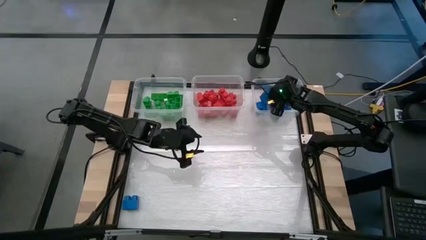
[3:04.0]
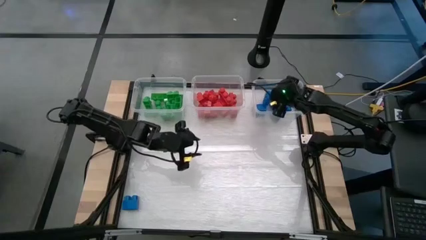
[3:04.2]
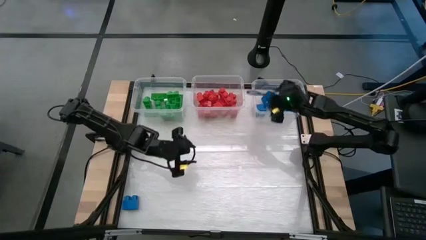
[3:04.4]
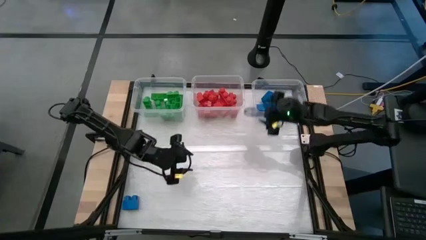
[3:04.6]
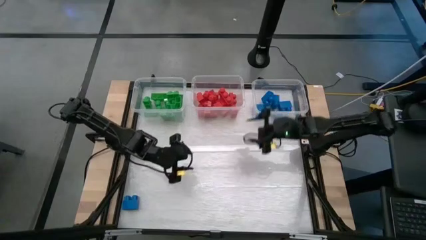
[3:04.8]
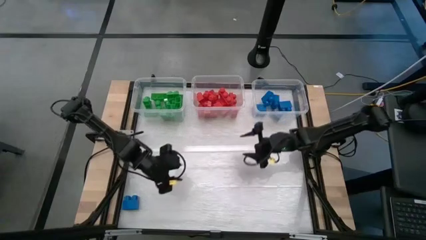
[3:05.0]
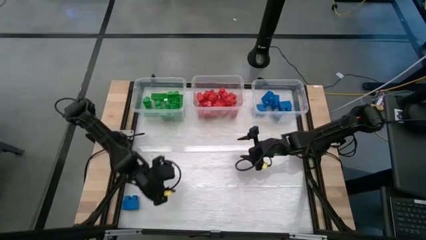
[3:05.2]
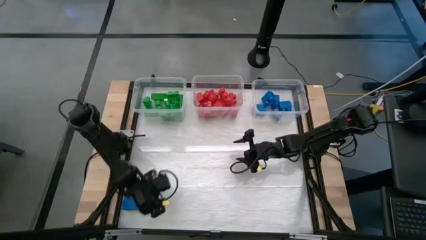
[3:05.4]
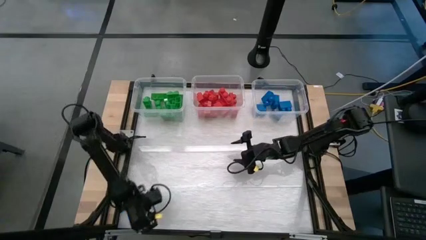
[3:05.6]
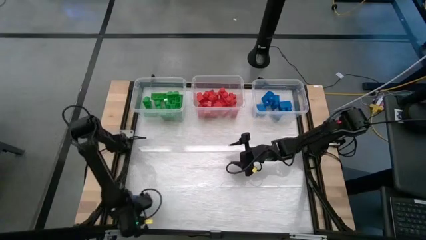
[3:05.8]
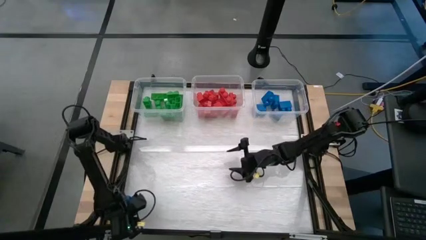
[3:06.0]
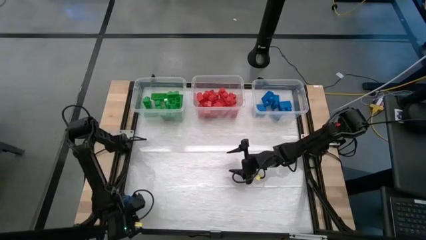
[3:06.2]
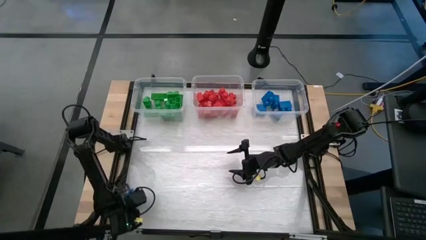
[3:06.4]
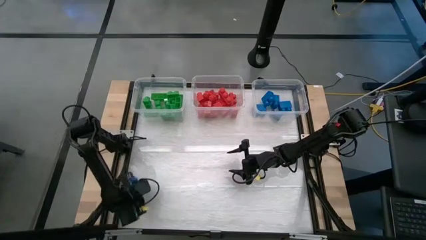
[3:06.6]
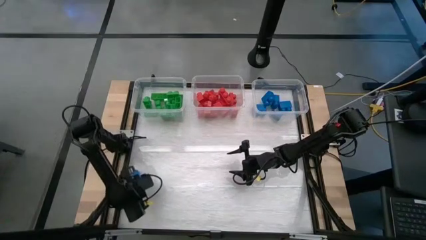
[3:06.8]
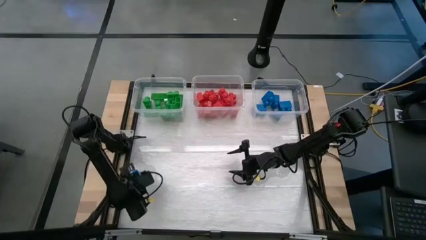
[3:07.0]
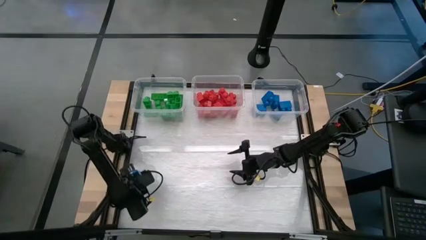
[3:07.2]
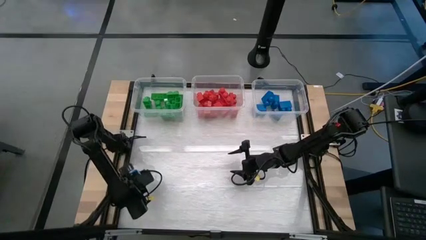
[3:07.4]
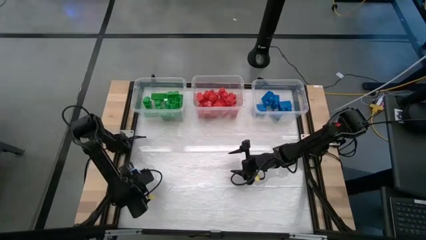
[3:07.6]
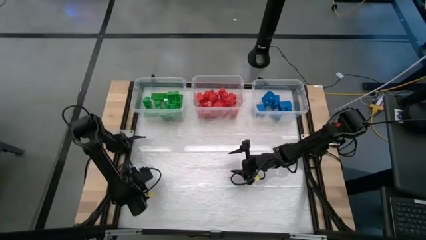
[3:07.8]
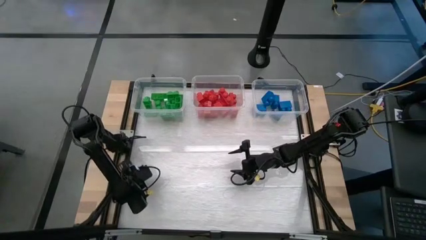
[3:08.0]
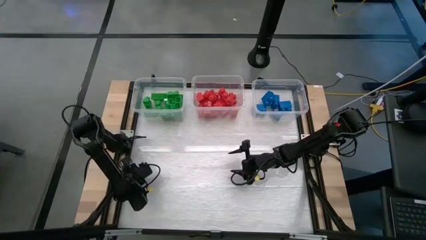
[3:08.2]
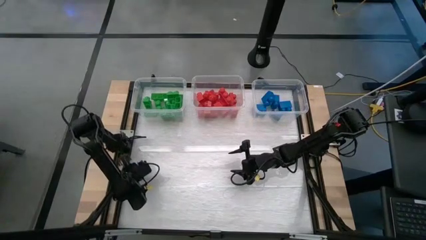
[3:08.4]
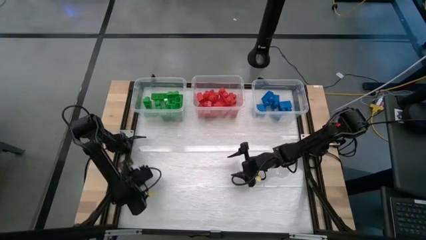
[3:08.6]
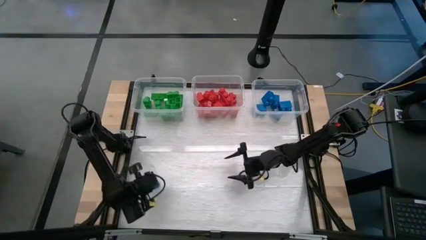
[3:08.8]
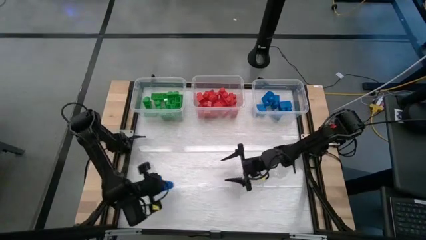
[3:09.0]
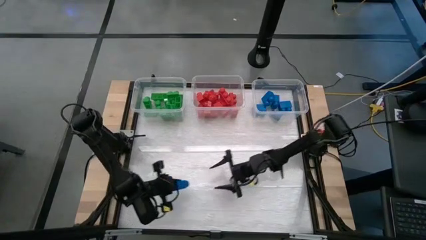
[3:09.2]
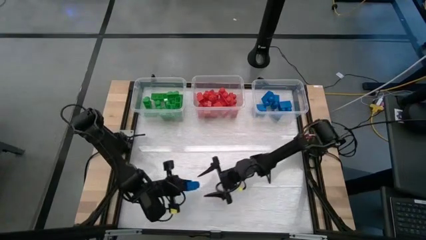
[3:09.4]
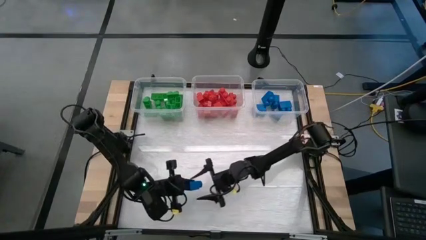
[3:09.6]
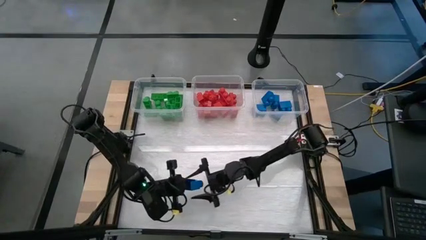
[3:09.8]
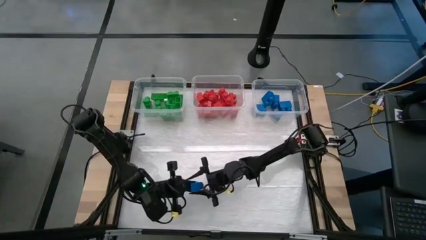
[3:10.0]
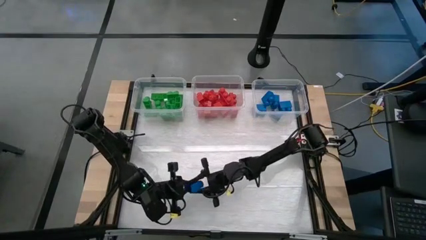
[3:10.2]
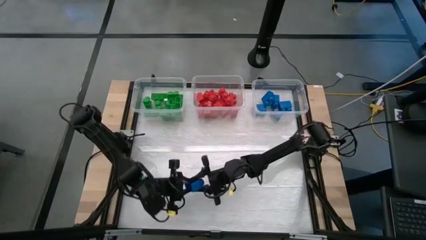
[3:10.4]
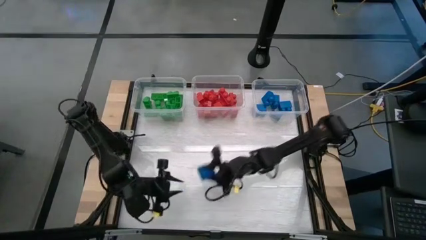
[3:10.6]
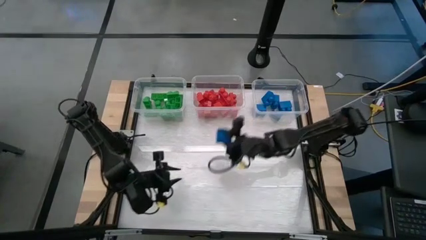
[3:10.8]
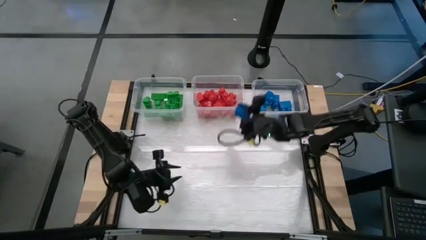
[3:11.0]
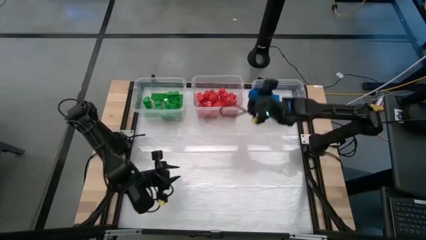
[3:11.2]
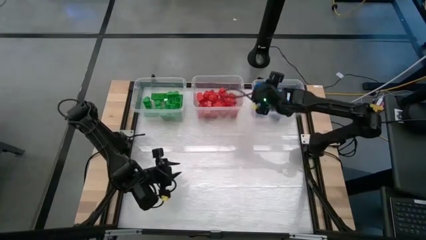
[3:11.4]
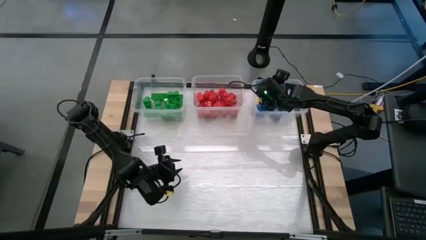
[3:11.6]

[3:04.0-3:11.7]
Task: Sort blocks
Put the blue game piece into the right transparent bin

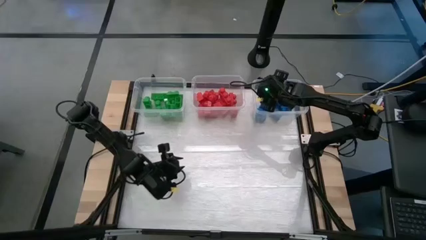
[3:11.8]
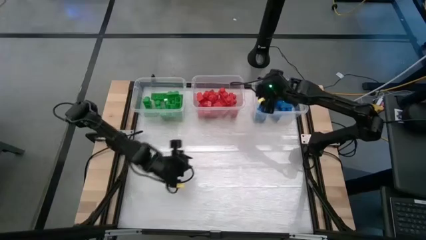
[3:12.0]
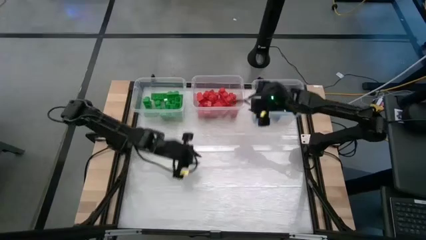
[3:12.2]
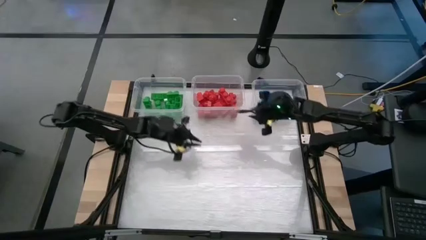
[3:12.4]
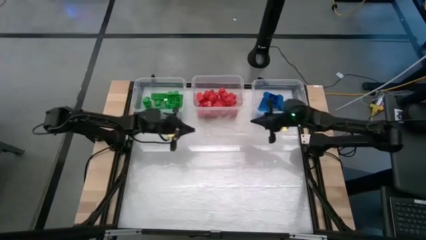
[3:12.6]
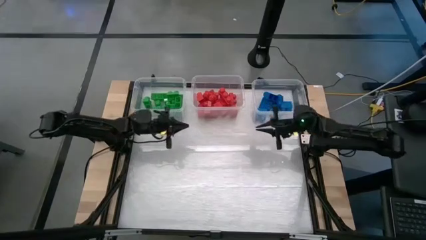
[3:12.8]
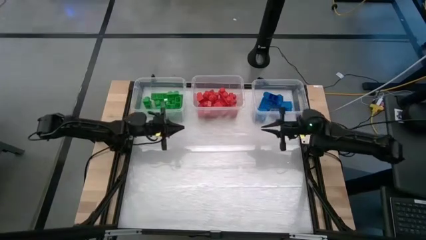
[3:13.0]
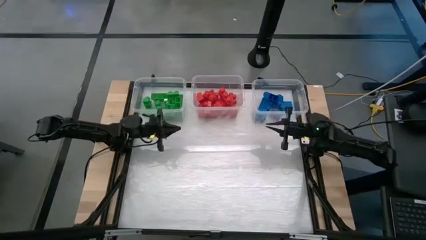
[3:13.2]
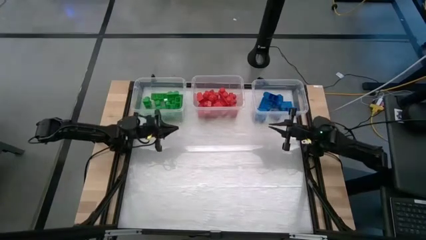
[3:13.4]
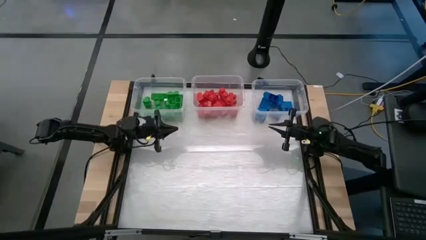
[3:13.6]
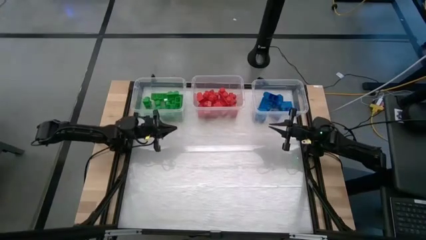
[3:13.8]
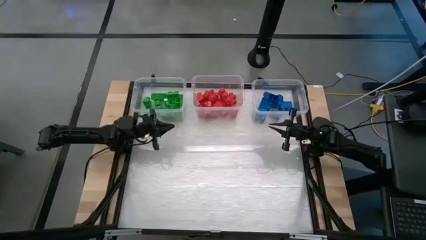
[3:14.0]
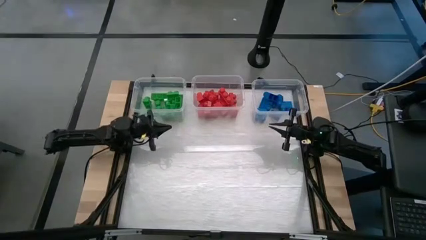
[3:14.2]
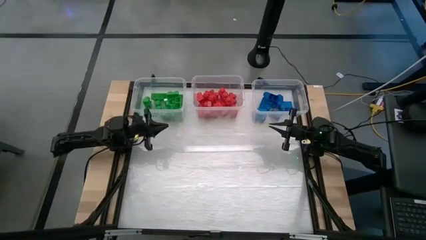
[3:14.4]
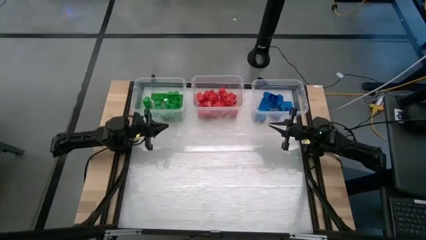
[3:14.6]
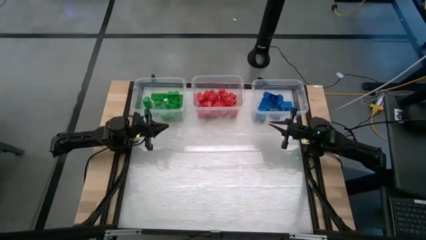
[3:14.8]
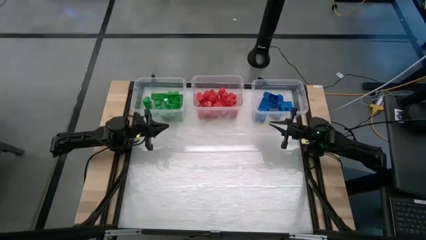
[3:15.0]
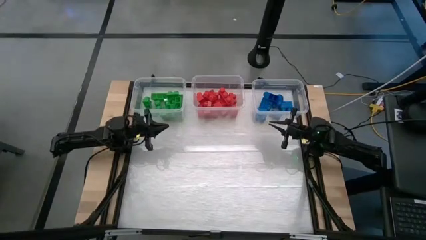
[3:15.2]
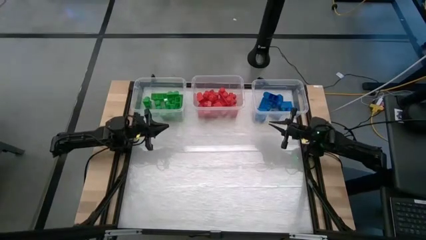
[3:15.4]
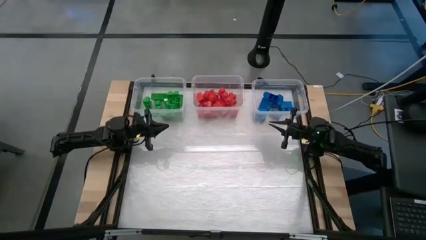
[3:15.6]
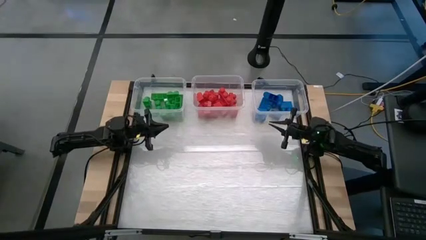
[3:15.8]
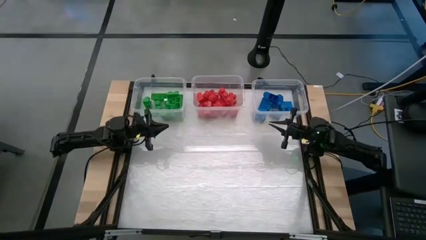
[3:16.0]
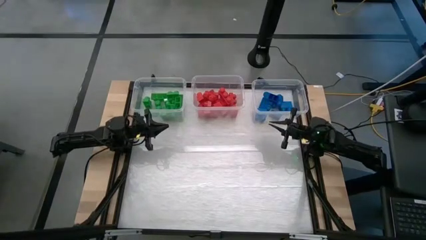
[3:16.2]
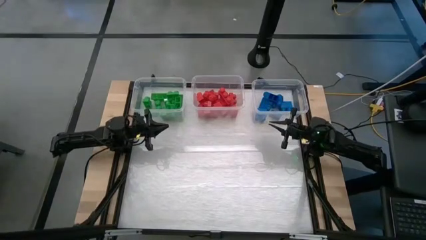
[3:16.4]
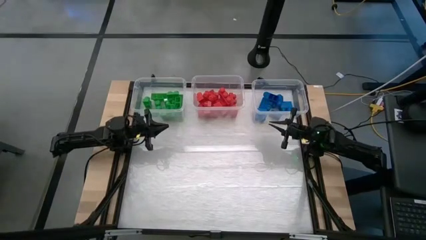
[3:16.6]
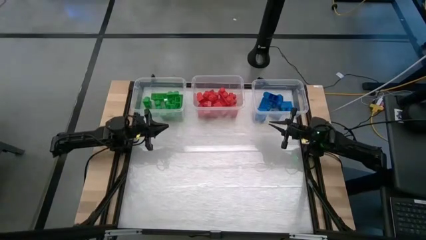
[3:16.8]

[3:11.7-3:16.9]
Return to Home Position

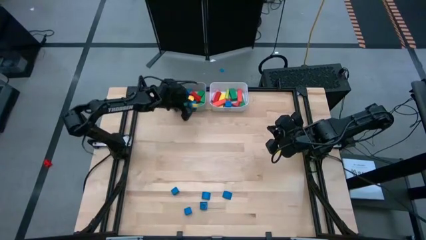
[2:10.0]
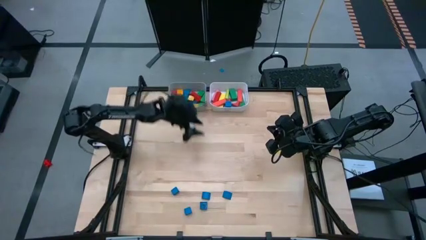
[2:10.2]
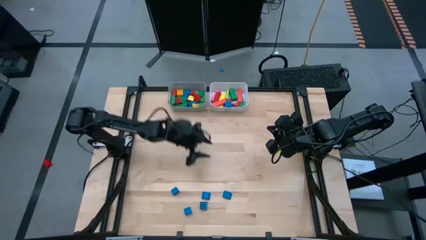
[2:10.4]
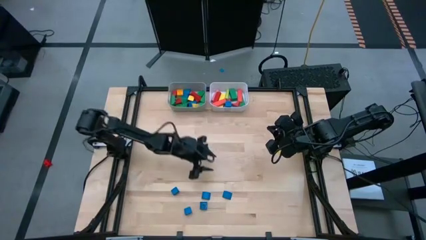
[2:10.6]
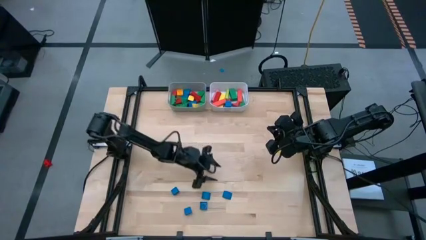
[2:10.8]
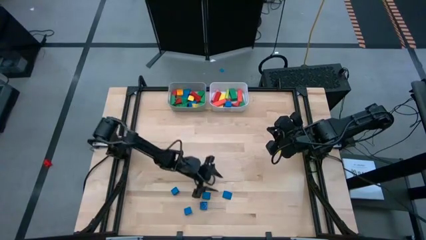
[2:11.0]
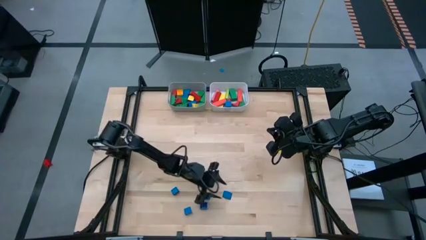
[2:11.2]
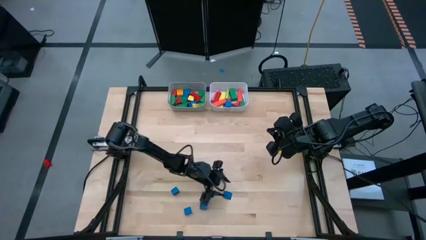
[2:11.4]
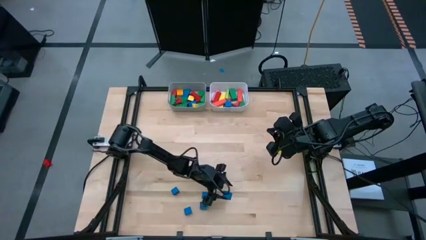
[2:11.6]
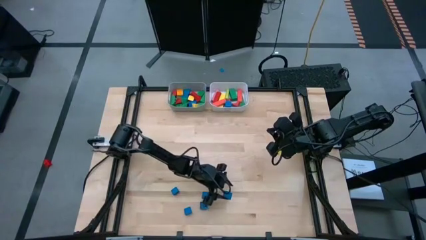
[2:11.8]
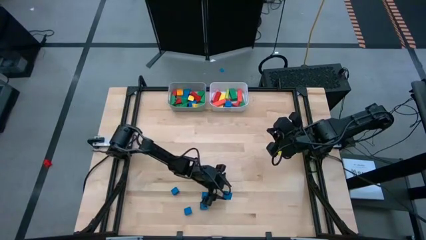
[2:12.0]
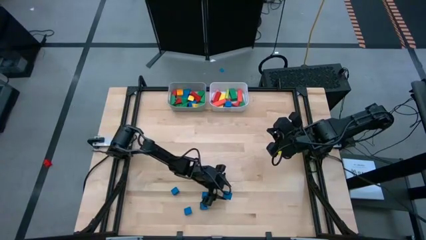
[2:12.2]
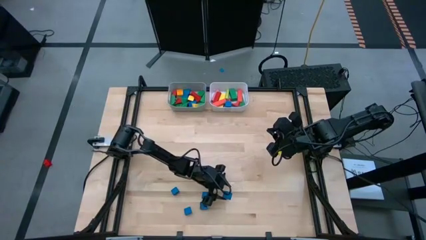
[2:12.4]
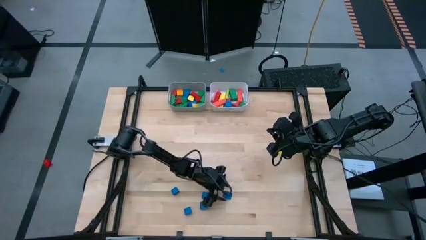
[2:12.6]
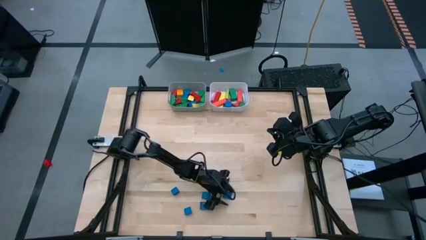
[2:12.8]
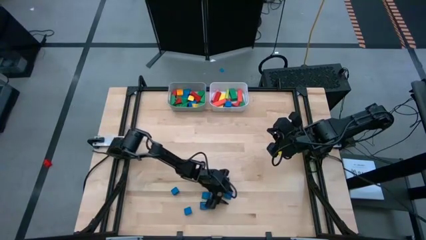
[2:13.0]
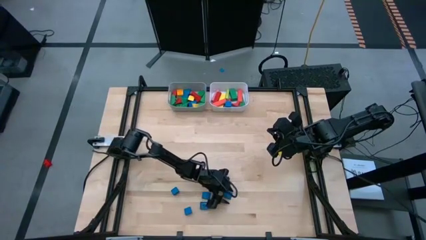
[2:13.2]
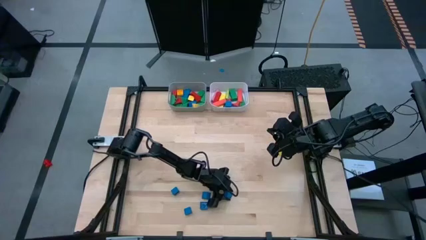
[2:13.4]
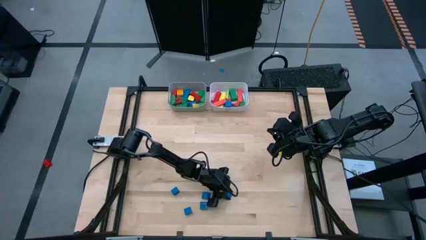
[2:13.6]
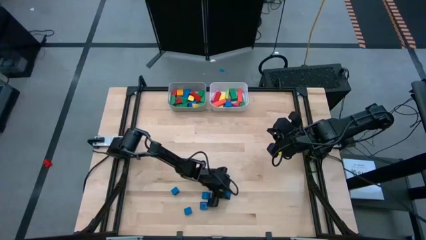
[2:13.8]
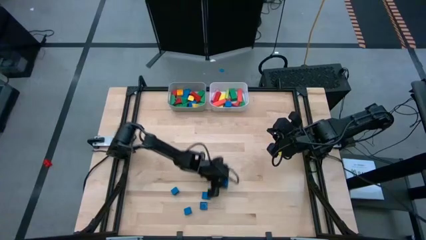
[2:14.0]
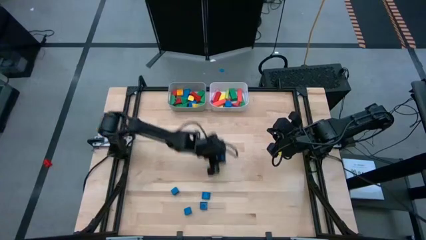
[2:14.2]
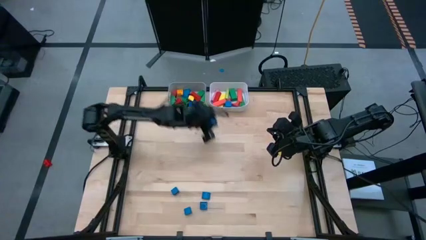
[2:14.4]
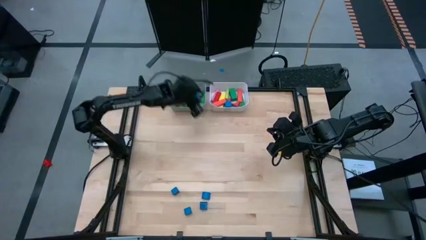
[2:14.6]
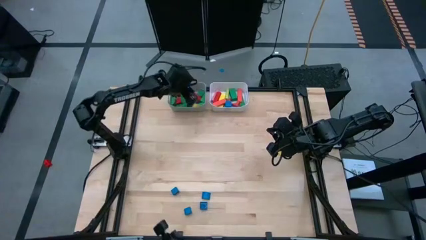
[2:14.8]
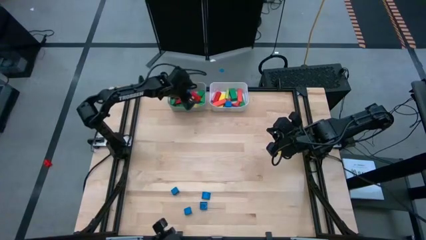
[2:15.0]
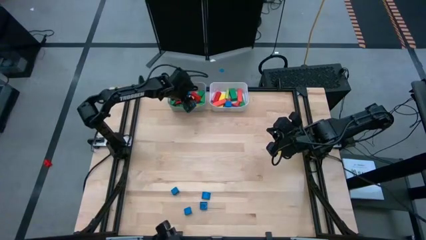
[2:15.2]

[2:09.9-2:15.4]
Task: Sort blocks by size
Put the blue triangular block into the gray bin
